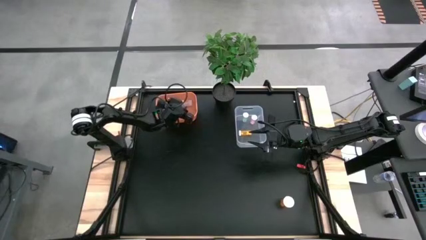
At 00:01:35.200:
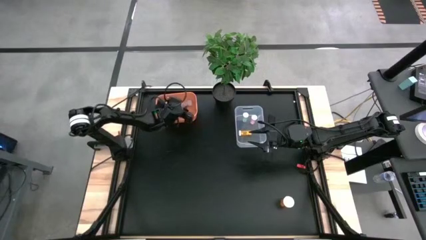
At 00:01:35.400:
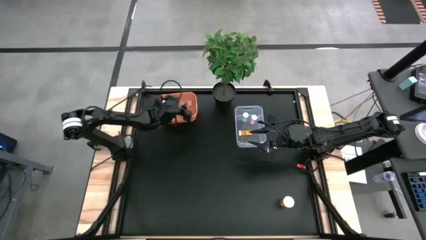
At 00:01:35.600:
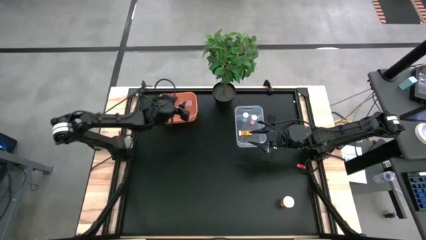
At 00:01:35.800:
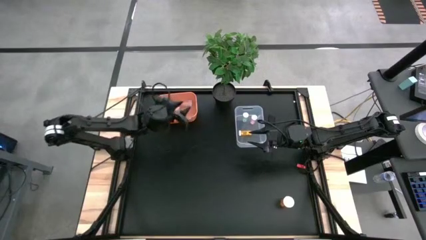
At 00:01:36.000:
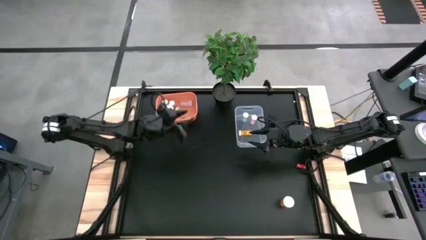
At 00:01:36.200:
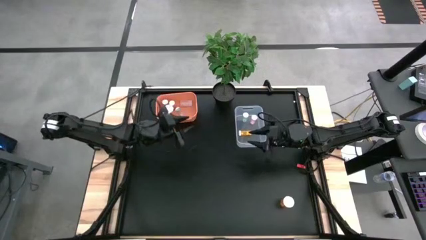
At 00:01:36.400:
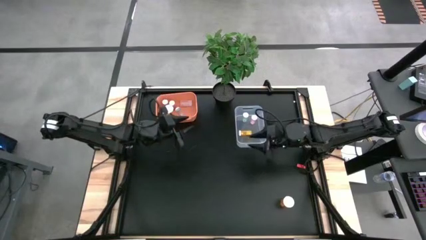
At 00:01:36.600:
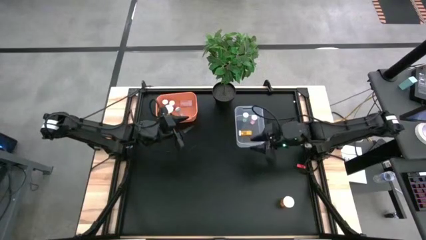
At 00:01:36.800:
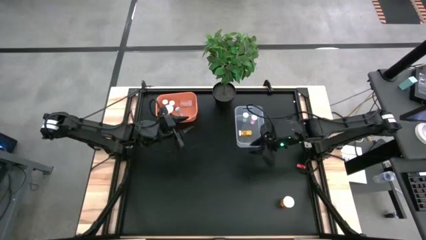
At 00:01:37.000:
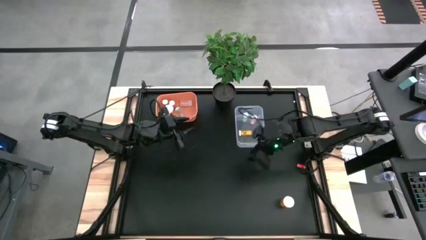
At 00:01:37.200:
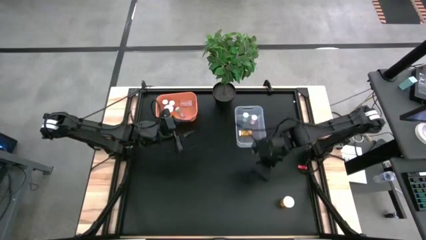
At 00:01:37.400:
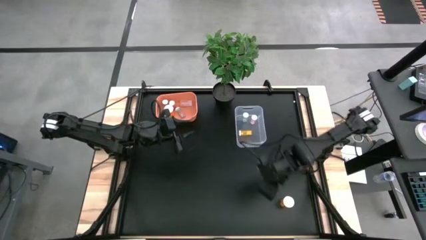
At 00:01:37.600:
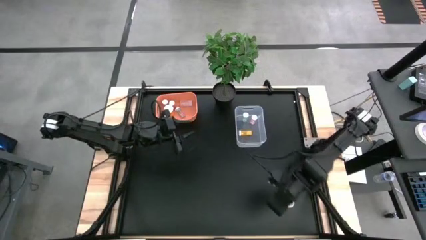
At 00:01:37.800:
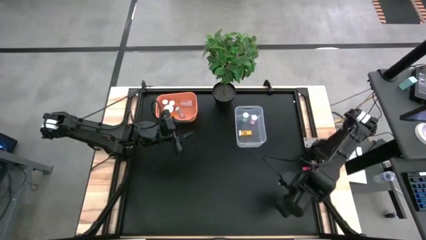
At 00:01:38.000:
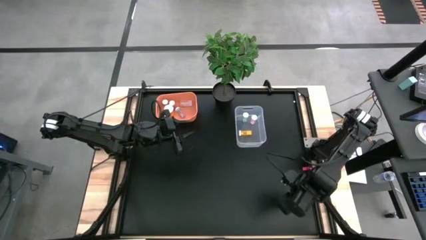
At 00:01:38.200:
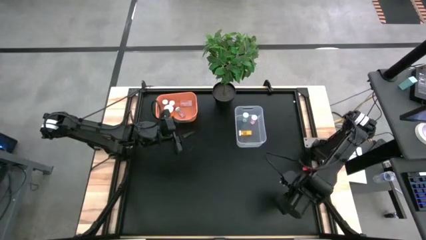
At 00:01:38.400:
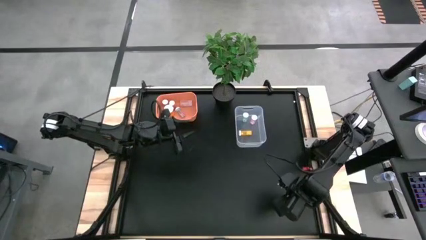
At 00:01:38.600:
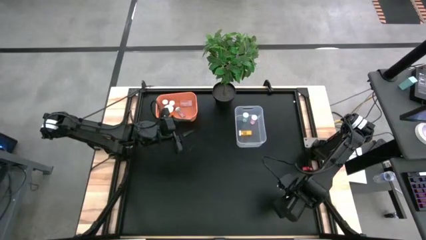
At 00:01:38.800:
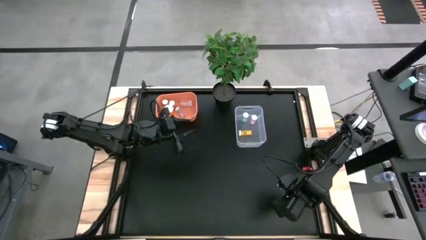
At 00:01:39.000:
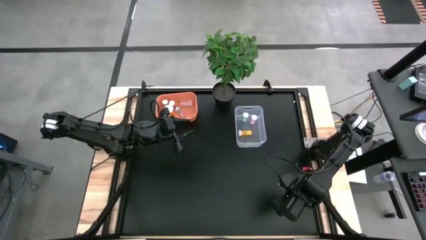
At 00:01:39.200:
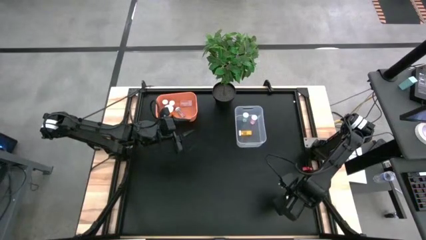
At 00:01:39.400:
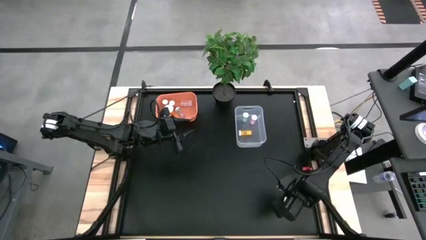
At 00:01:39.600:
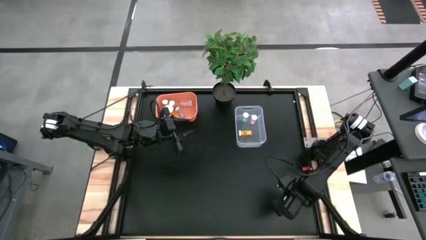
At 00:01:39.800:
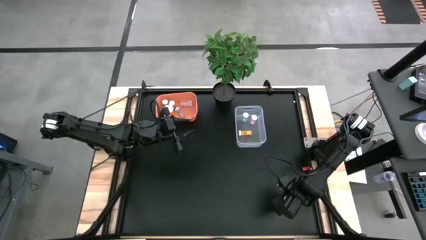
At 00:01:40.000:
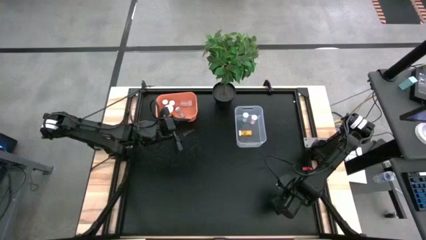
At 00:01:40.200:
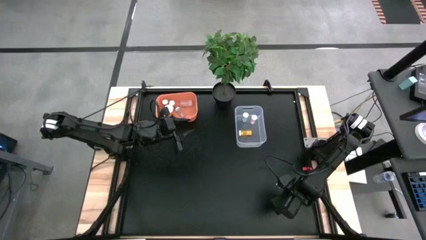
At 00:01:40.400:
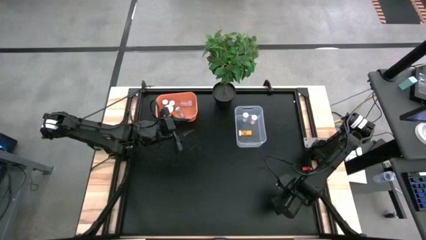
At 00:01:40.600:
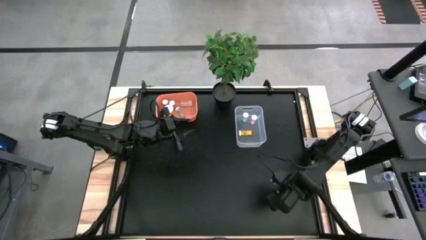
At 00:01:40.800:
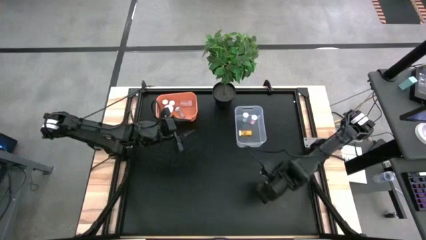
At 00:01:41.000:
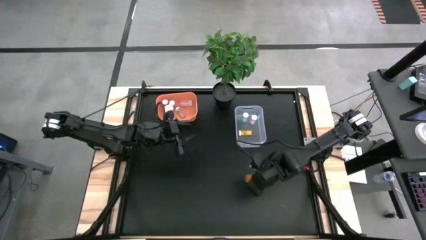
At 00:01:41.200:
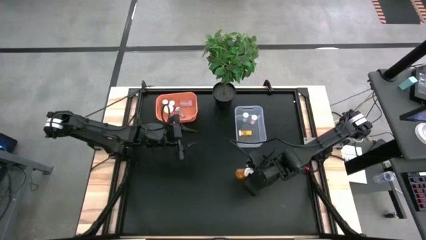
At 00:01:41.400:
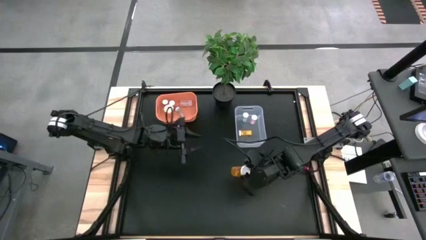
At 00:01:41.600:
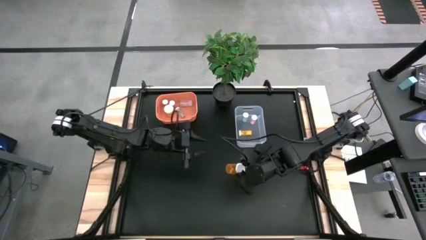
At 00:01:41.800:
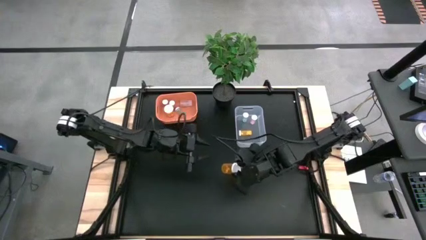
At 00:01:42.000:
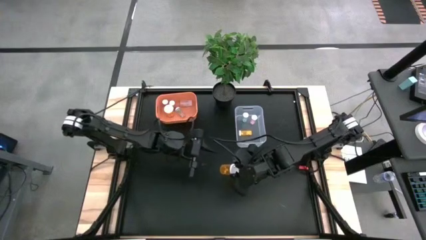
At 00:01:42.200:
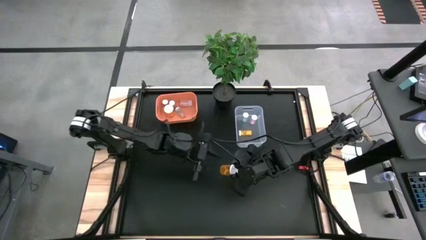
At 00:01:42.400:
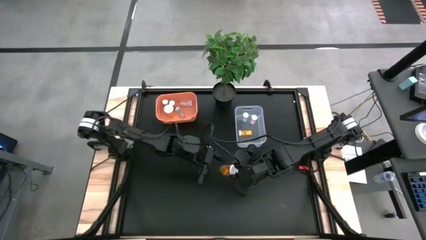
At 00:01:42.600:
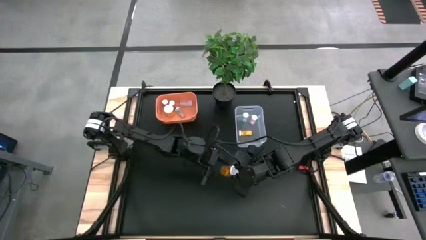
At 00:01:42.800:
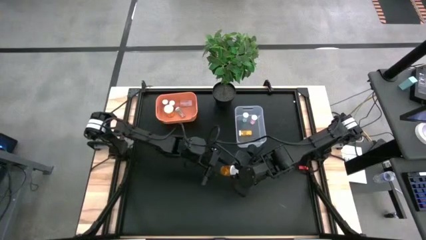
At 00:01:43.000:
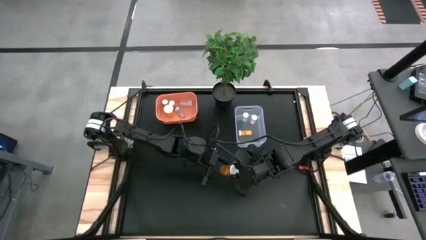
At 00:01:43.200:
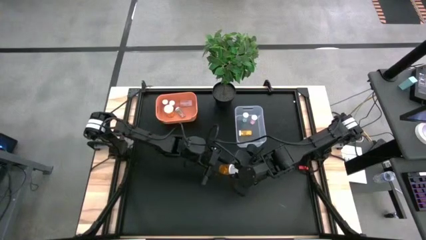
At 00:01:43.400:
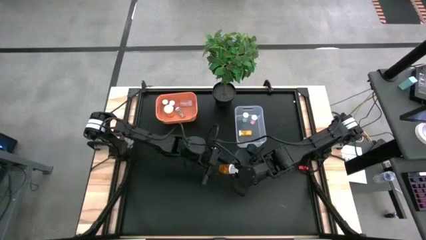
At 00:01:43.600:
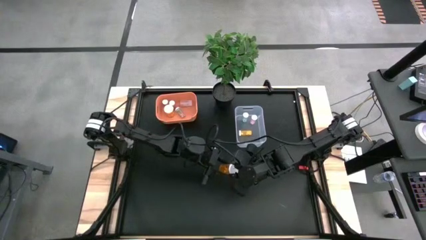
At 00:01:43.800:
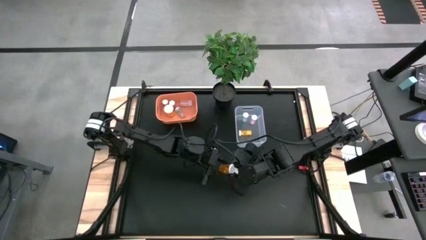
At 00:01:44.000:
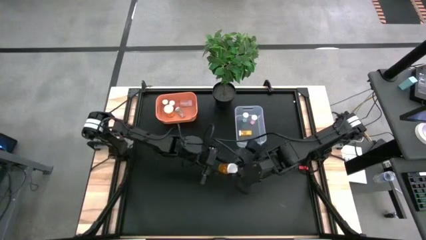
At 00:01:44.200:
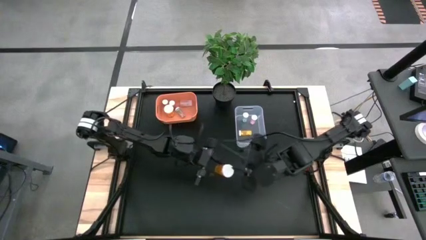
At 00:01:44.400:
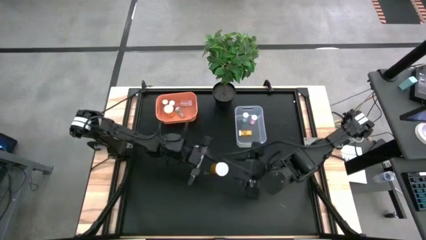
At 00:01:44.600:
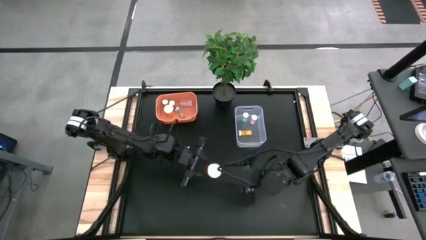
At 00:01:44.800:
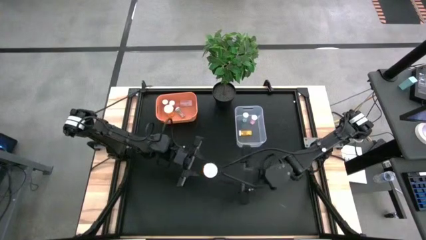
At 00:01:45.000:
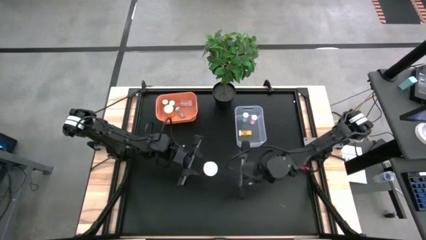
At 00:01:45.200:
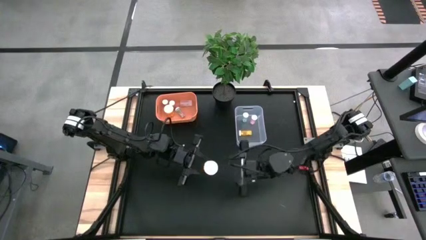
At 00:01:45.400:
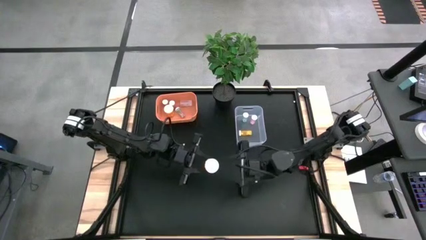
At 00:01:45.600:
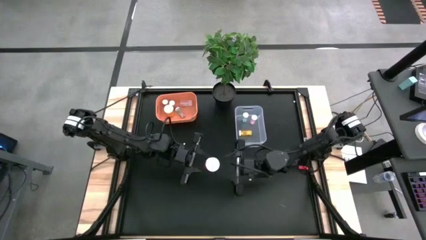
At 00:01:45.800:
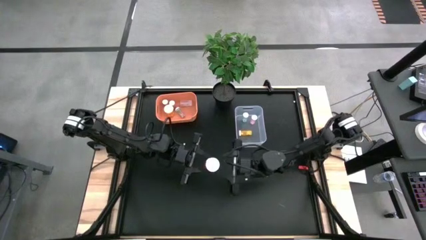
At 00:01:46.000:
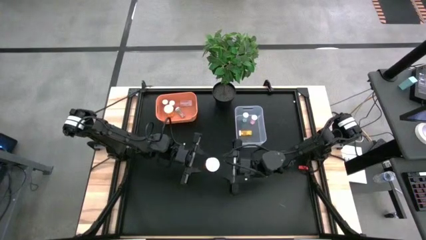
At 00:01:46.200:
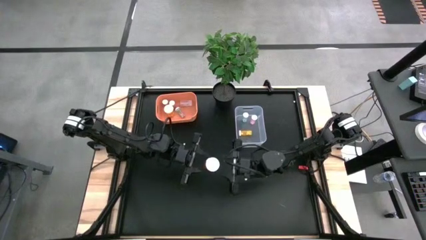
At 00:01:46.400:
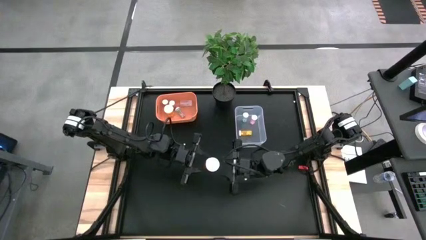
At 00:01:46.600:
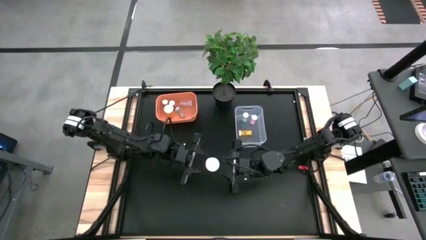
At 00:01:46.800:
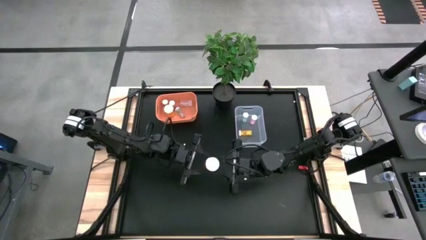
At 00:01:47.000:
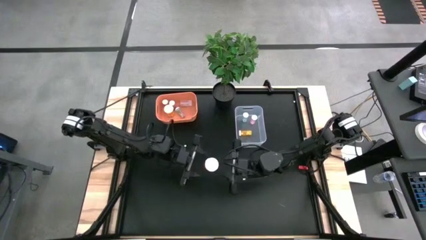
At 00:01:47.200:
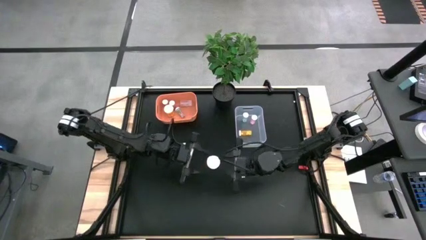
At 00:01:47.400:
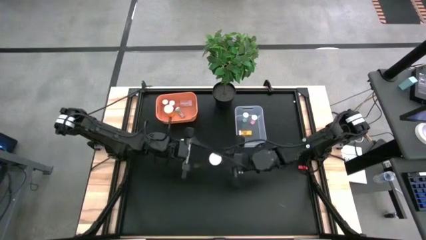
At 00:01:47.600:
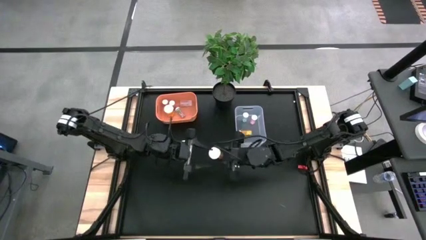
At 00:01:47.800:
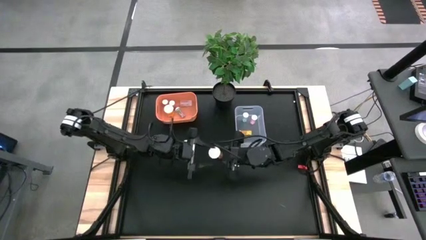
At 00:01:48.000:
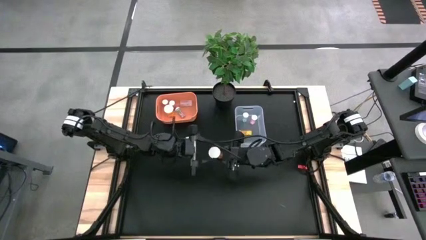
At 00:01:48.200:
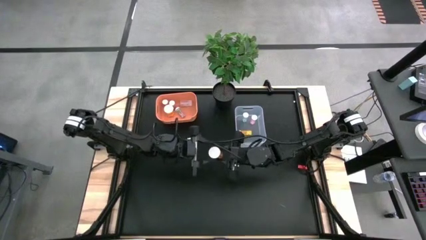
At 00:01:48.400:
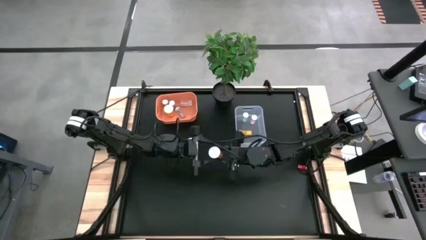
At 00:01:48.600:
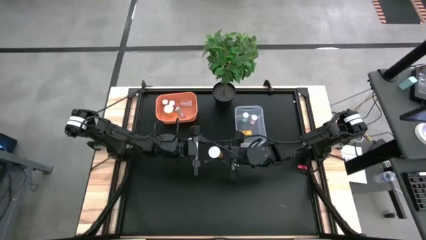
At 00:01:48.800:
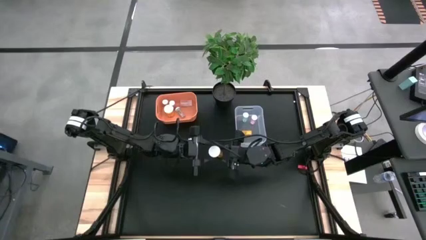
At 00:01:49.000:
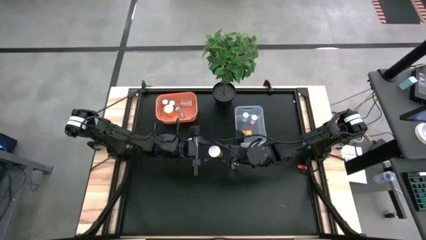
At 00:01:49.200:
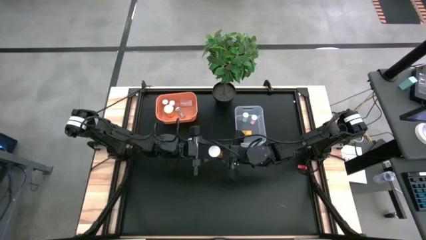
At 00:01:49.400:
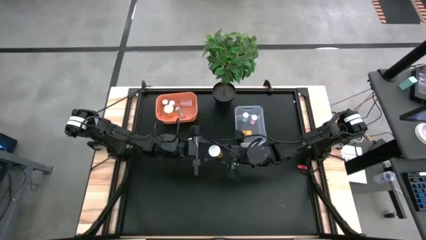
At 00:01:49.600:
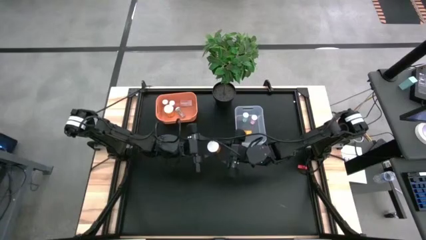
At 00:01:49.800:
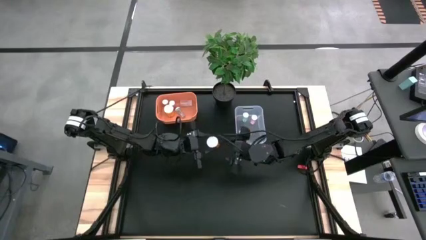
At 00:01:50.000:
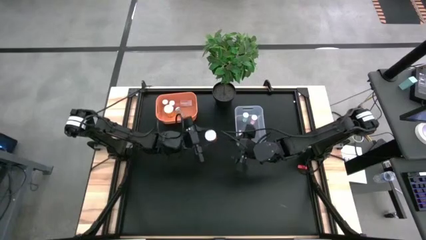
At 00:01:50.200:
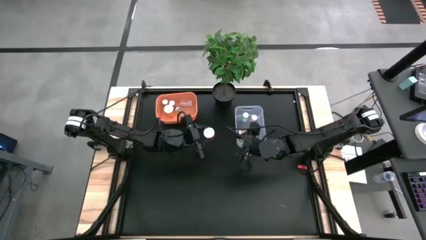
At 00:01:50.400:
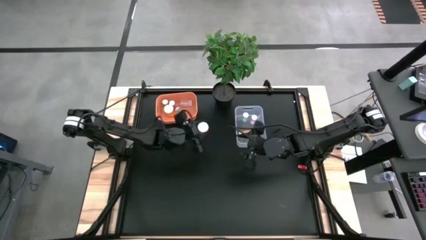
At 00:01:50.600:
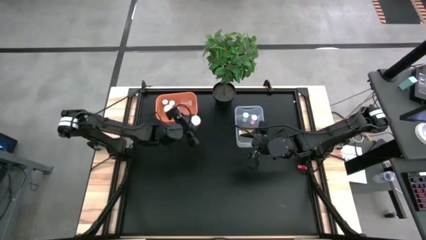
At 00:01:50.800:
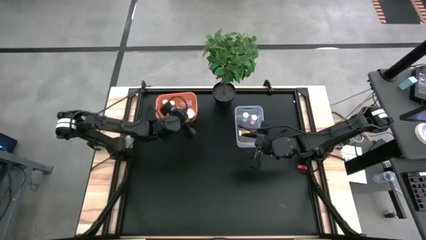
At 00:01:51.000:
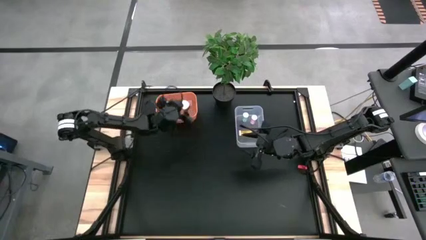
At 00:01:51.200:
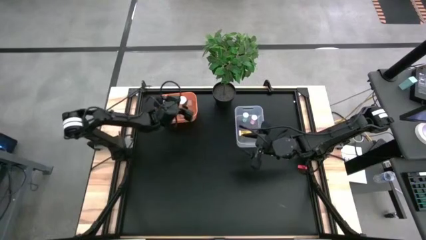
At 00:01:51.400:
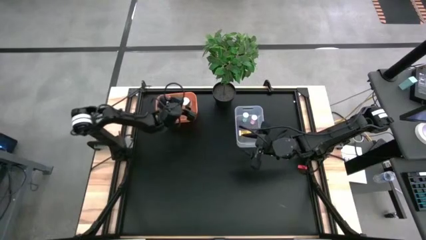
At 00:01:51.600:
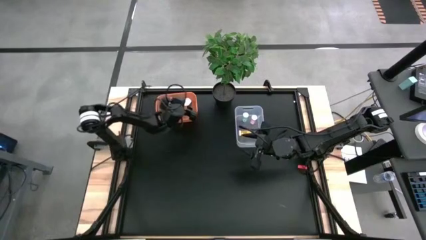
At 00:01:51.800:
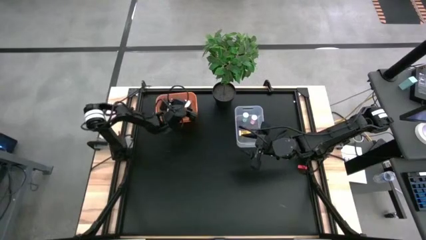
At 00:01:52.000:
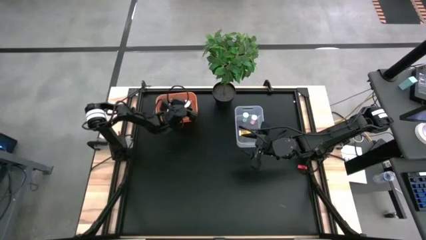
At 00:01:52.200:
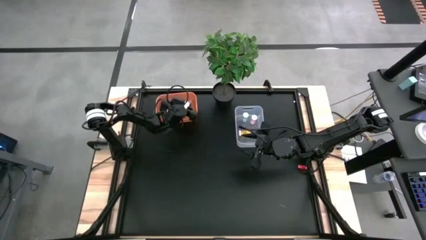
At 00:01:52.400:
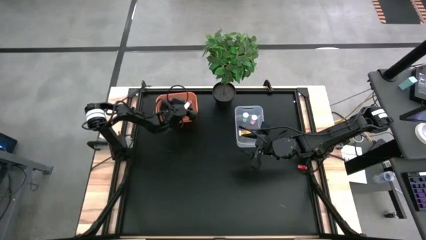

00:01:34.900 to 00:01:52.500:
Task: Pick and place medicine bottles into bin by pill shape (circle, oval)
Put the orange tablet pill bottle into the orange bin
